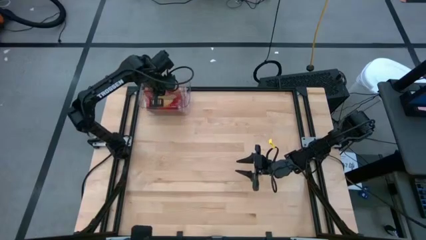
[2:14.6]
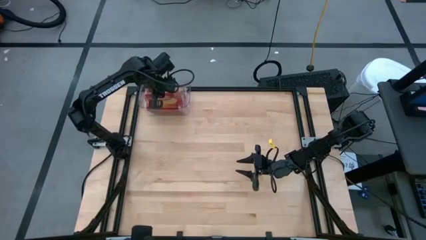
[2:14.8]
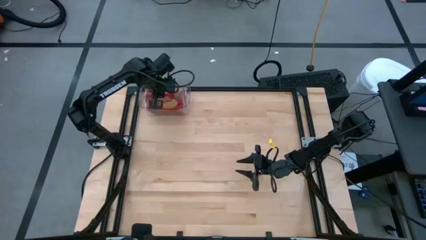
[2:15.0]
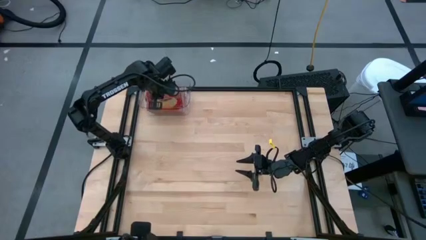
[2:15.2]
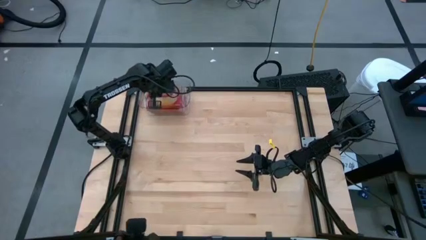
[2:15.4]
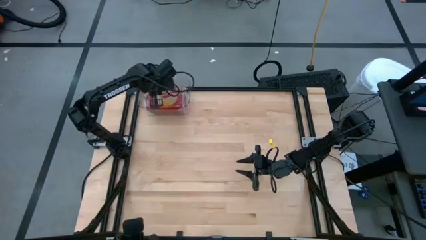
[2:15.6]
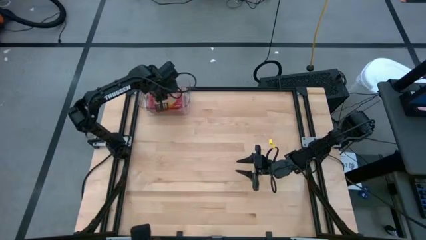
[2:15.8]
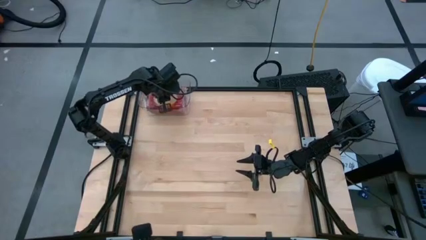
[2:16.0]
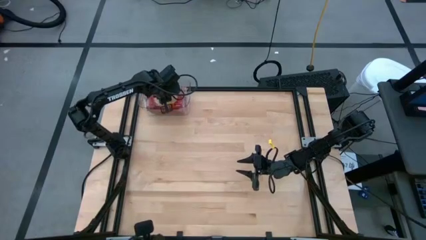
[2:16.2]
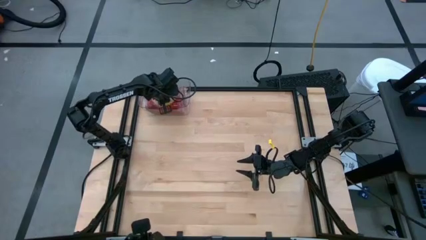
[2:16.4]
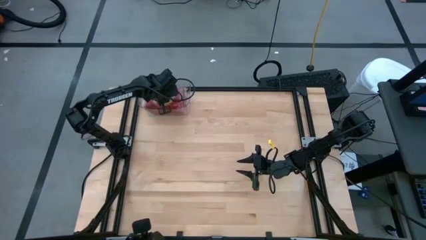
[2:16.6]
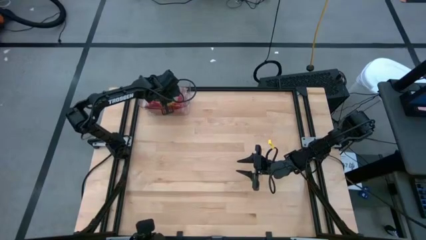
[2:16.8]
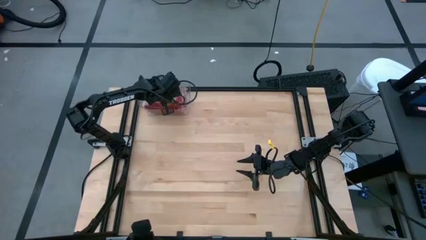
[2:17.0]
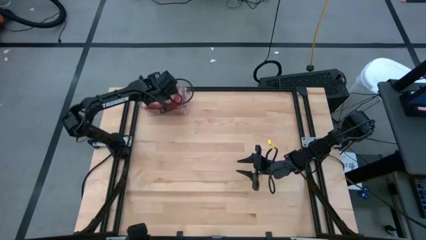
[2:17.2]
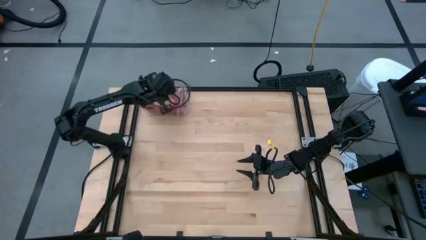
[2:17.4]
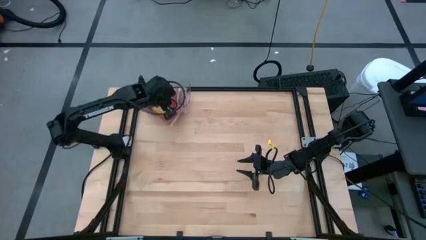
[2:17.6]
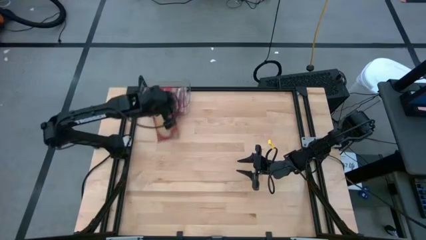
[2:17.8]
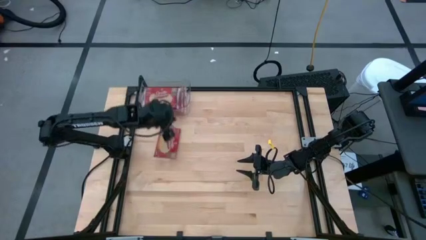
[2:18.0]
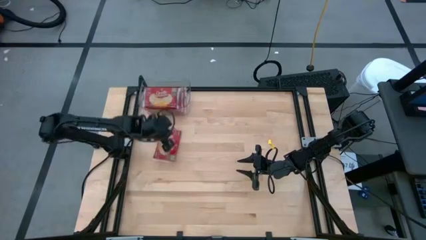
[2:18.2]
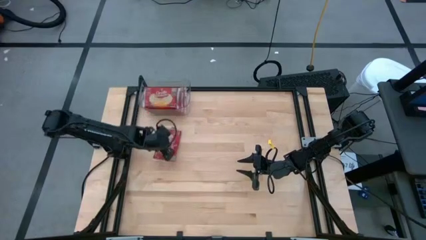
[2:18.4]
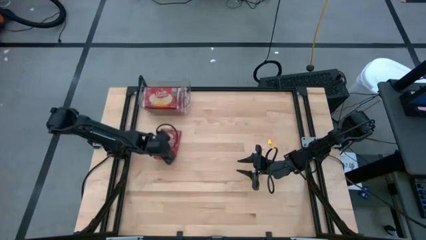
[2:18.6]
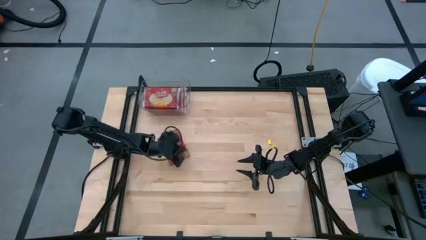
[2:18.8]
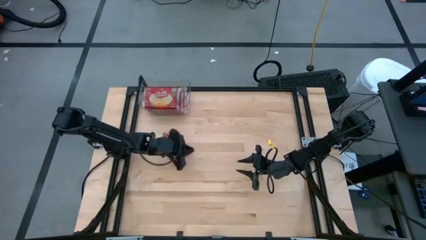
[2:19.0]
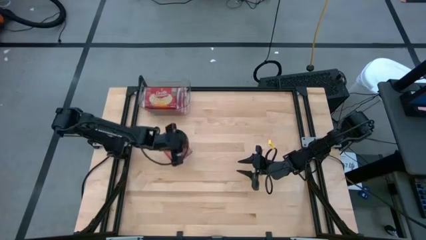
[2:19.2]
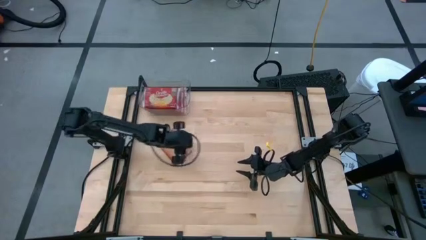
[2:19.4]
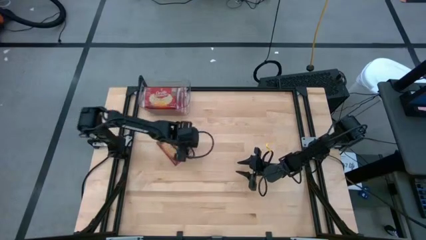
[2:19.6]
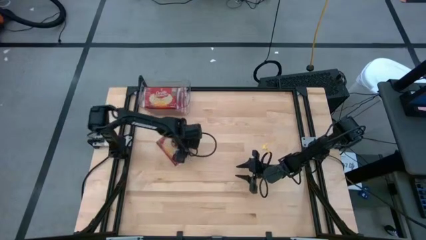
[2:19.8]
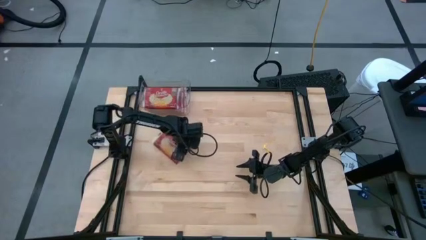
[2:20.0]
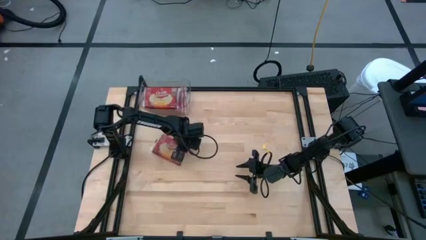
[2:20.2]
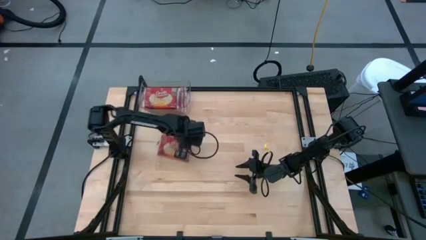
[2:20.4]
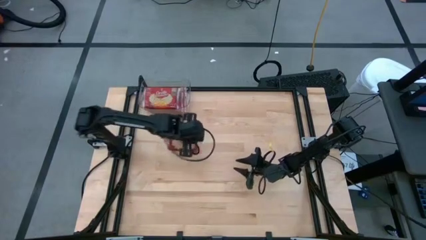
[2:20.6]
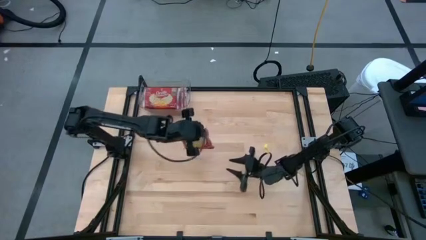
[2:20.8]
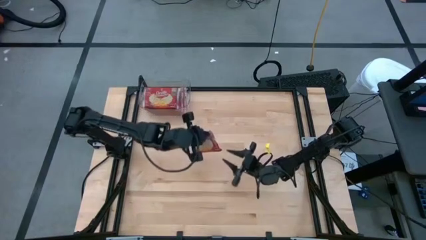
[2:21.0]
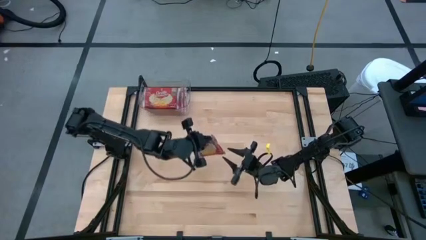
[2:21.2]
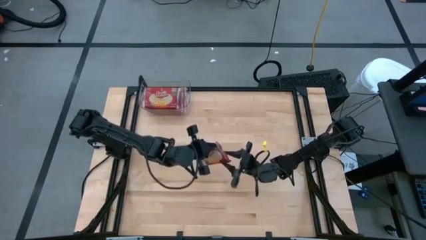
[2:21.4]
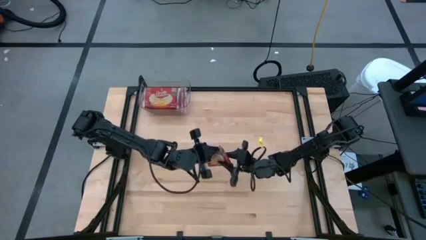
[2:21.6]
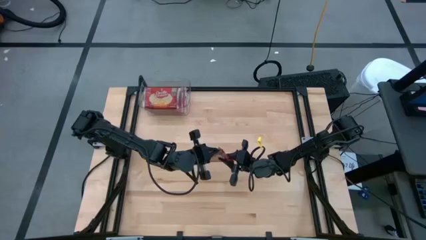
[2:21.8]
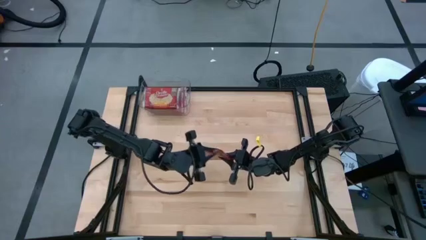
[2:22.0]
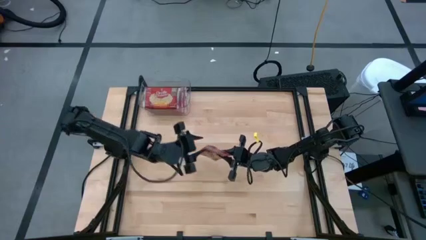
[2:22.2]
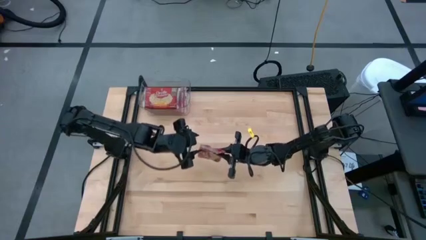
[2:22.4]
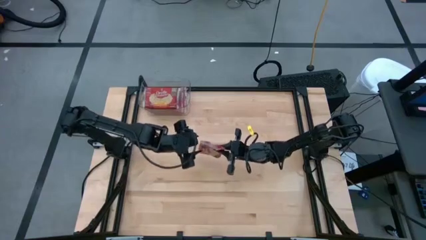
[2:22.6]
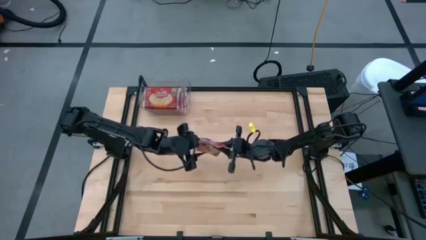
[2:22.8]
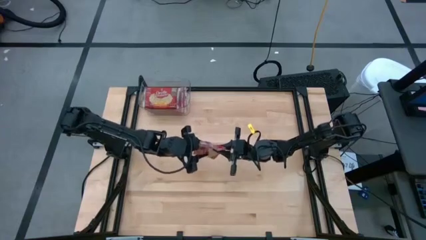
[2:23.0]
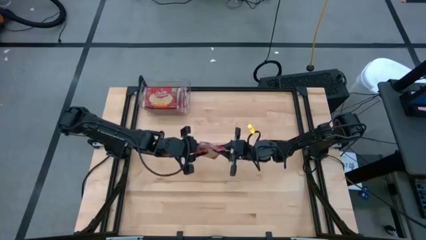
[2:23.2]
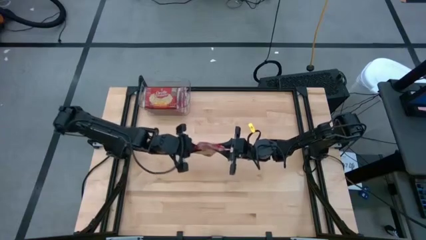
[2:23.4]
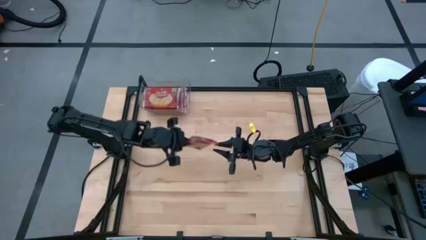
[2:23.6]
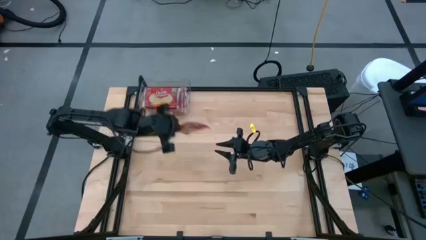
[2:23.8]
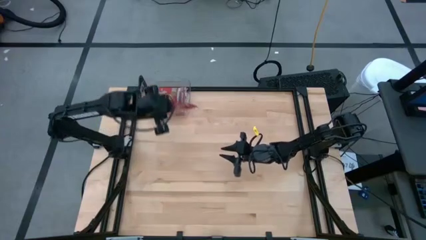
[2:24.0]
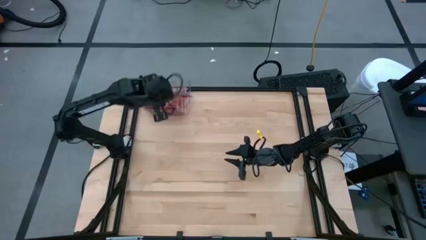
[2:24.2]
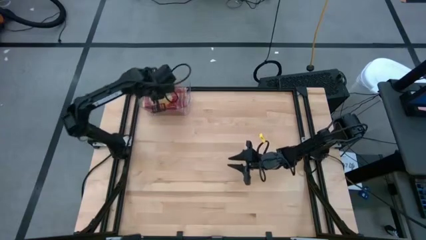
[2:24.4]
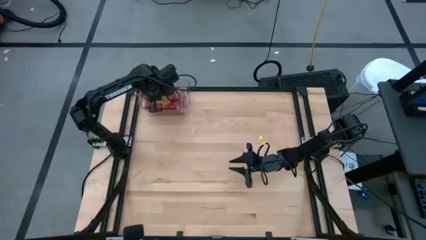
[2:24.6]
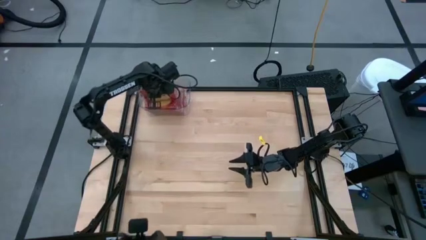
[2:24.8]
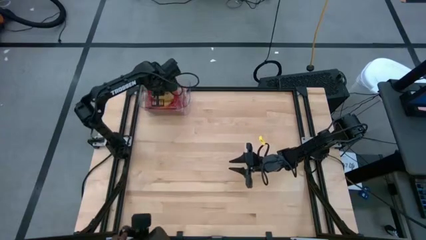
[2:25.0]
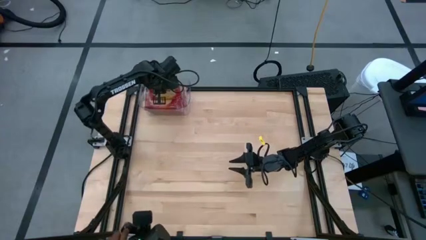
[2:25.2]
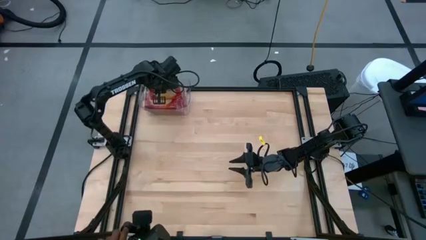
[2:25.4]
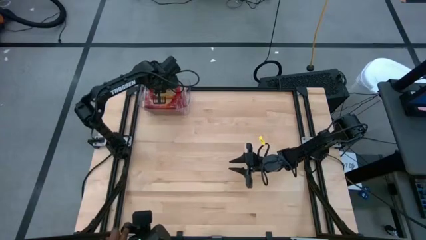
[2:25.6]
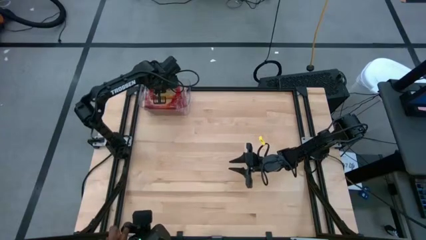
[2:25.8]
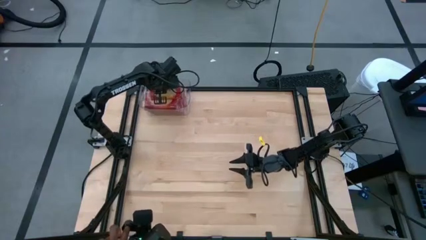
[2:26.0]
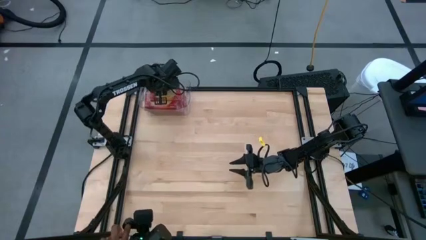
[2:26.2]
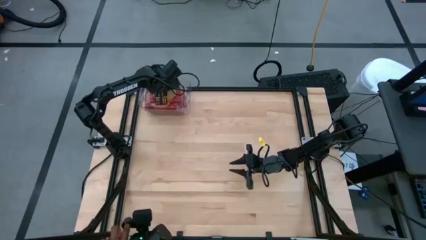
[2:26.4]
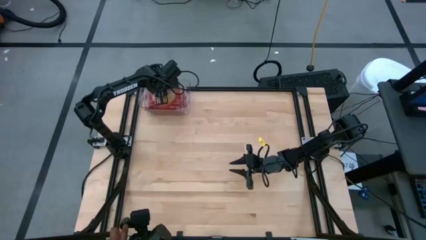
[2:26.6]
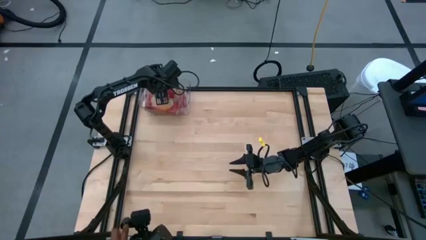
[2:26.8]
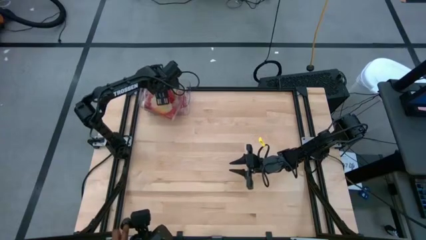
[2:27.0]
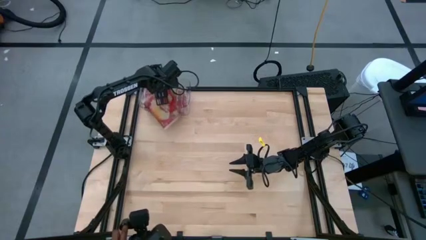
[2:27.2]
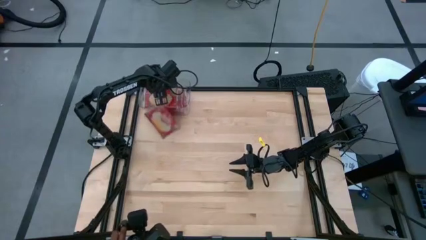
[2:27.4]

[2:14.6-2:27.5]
Task: Sort popcorn bags into baskets
Put the red popcorn bag into the transparent bin
